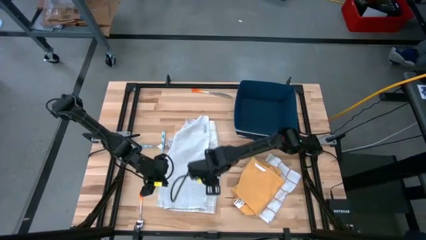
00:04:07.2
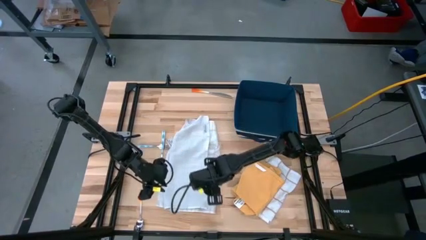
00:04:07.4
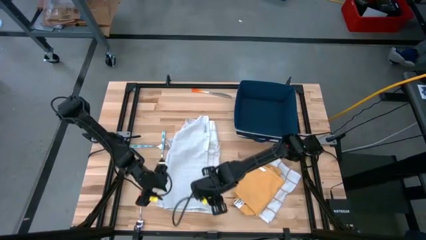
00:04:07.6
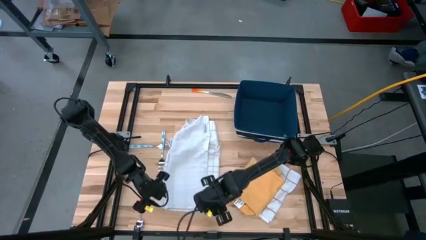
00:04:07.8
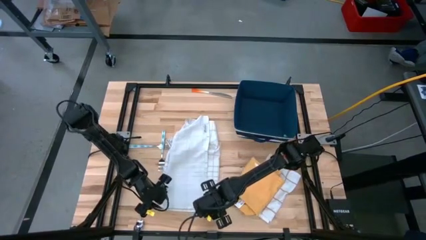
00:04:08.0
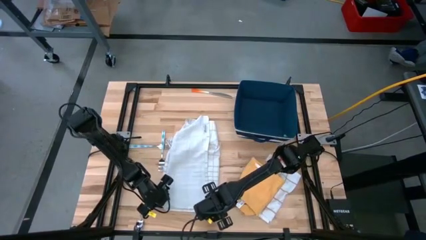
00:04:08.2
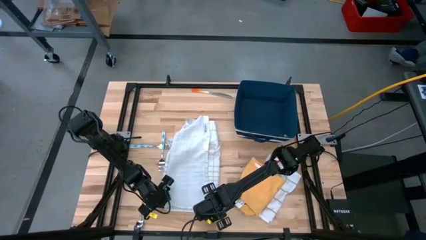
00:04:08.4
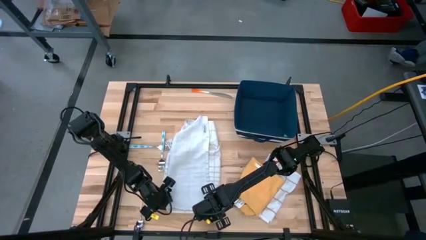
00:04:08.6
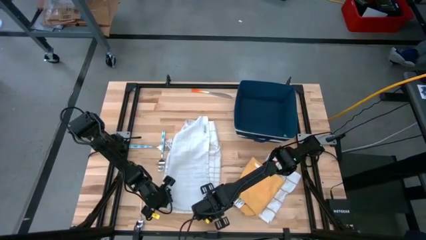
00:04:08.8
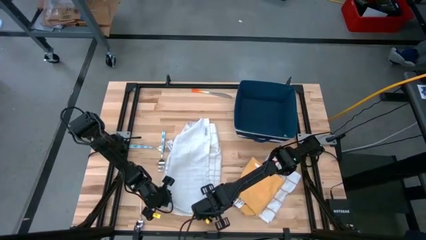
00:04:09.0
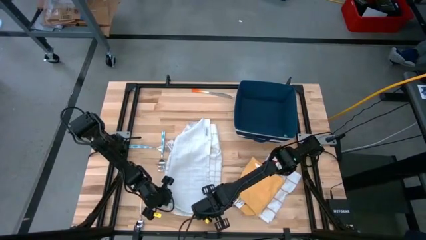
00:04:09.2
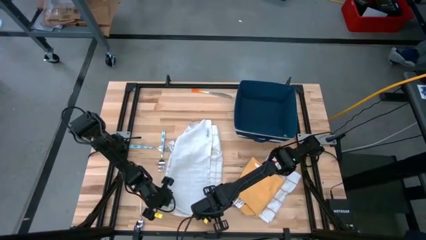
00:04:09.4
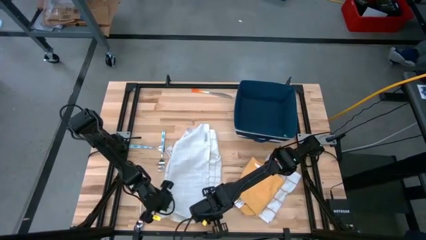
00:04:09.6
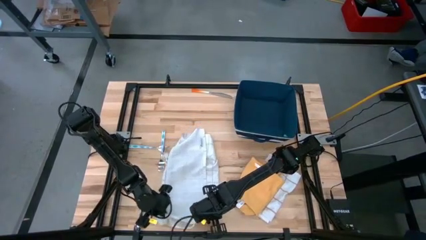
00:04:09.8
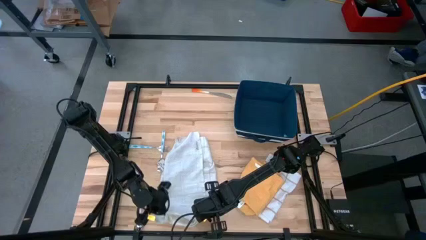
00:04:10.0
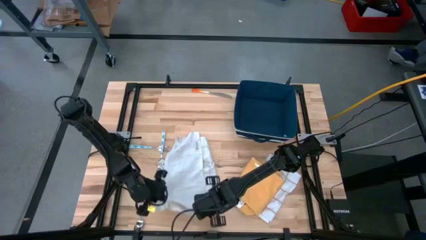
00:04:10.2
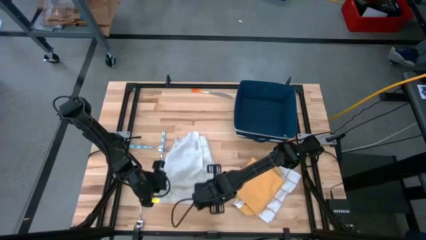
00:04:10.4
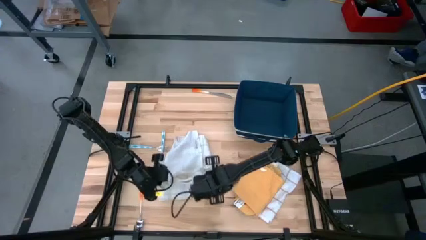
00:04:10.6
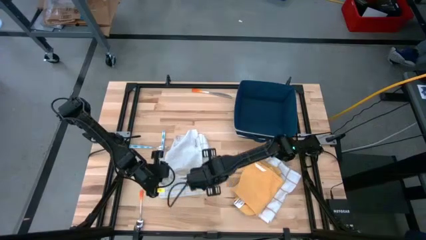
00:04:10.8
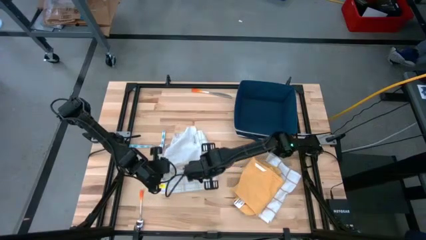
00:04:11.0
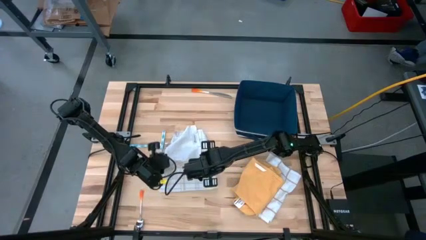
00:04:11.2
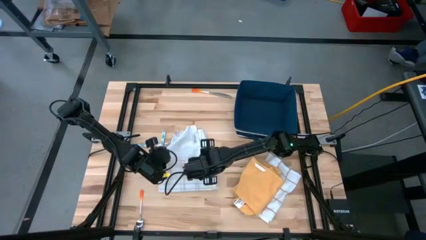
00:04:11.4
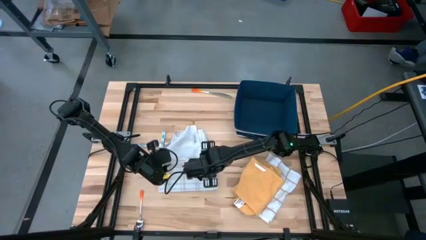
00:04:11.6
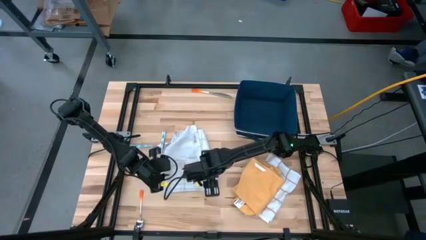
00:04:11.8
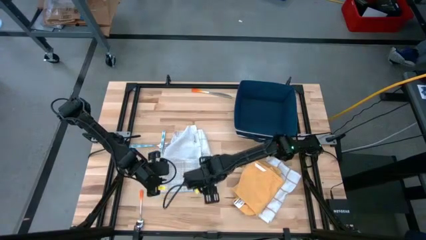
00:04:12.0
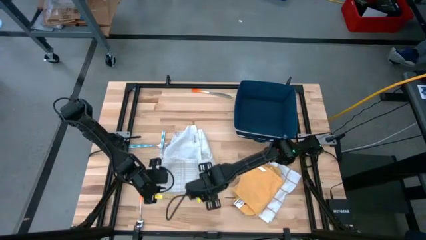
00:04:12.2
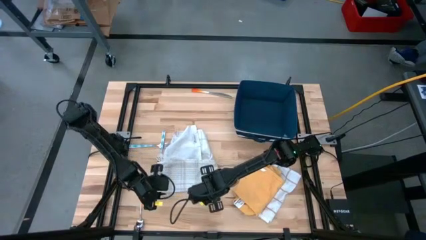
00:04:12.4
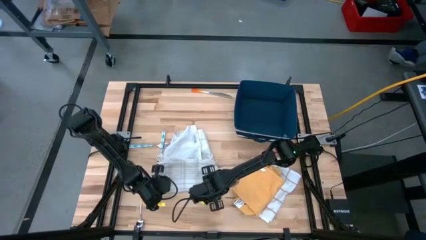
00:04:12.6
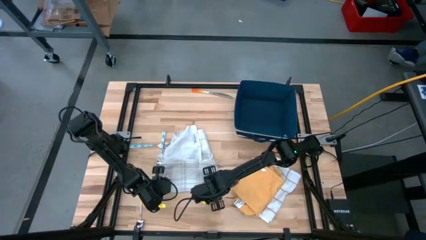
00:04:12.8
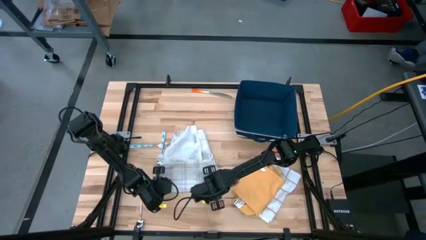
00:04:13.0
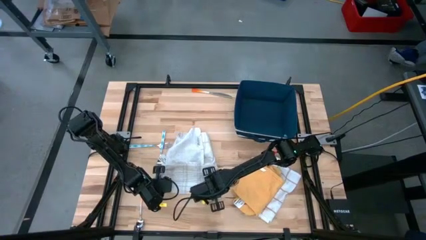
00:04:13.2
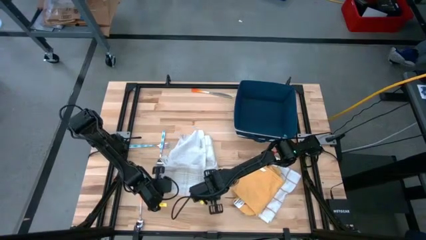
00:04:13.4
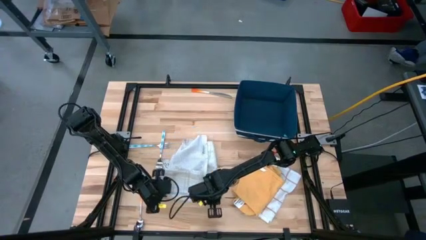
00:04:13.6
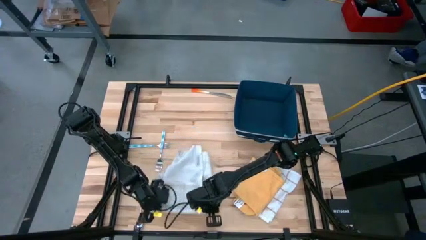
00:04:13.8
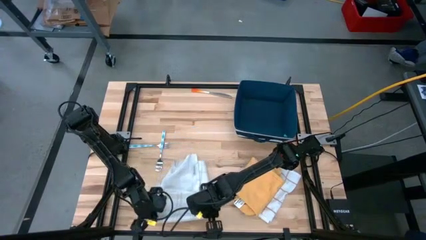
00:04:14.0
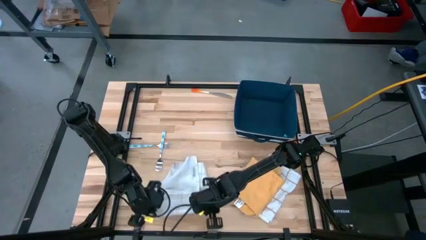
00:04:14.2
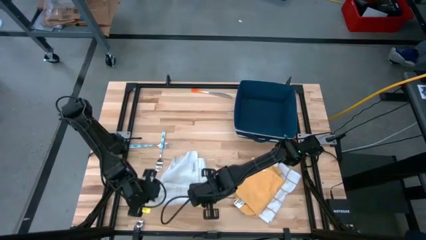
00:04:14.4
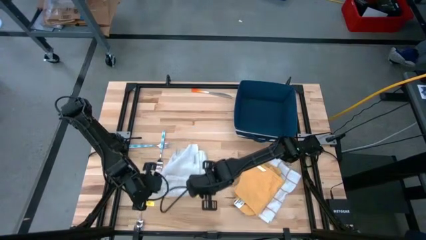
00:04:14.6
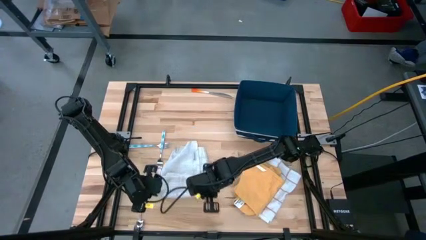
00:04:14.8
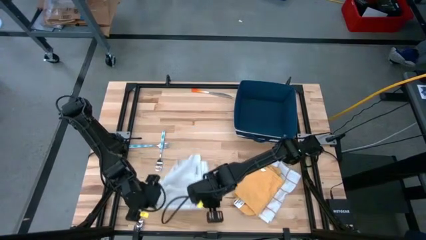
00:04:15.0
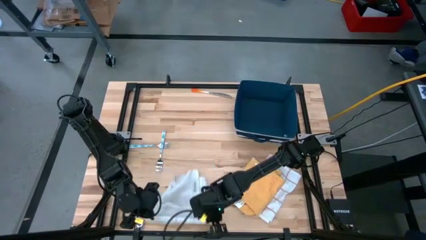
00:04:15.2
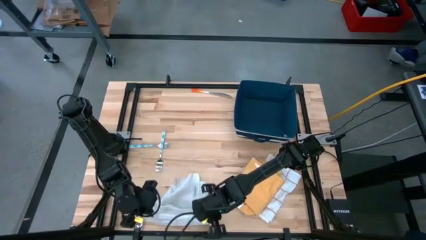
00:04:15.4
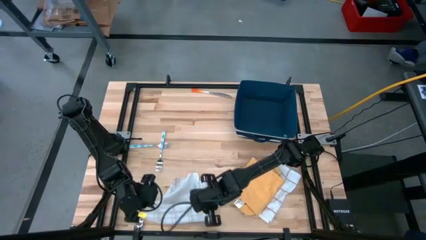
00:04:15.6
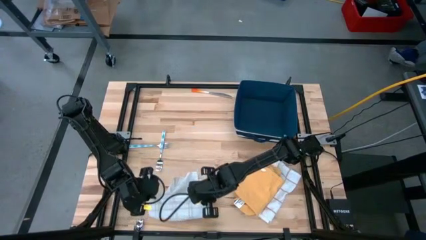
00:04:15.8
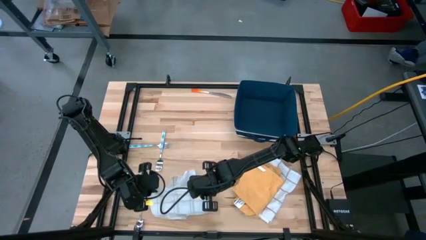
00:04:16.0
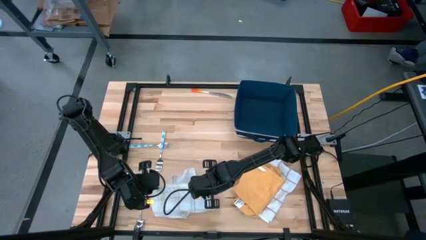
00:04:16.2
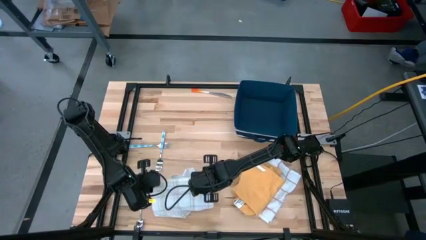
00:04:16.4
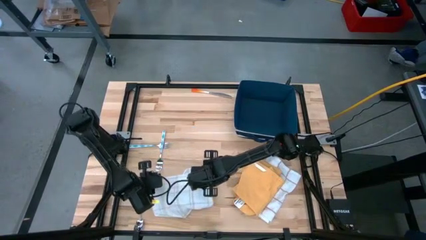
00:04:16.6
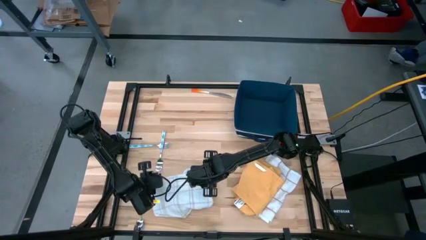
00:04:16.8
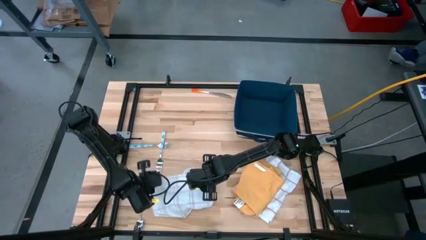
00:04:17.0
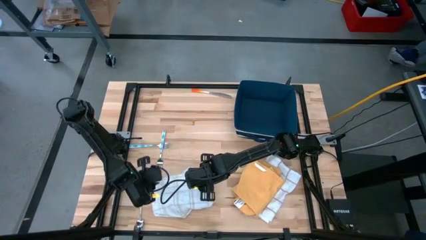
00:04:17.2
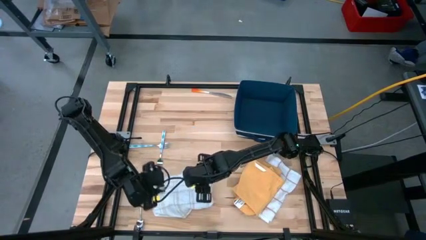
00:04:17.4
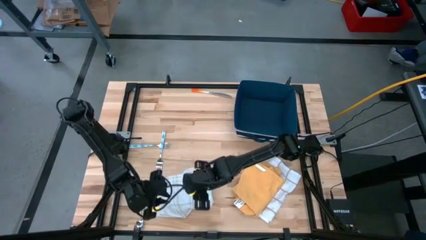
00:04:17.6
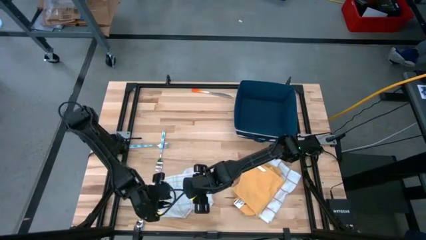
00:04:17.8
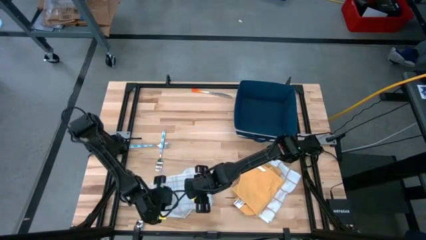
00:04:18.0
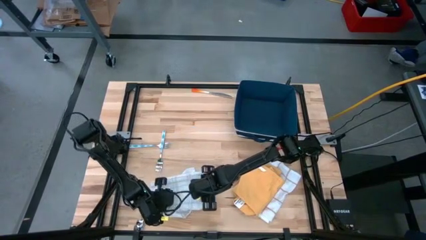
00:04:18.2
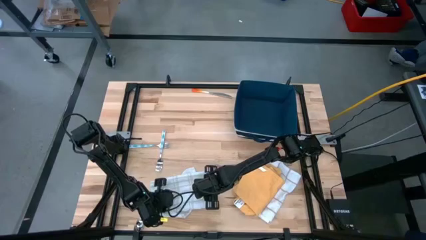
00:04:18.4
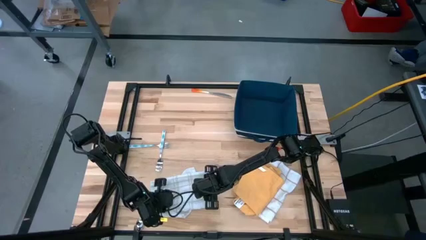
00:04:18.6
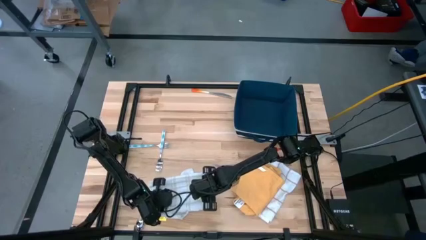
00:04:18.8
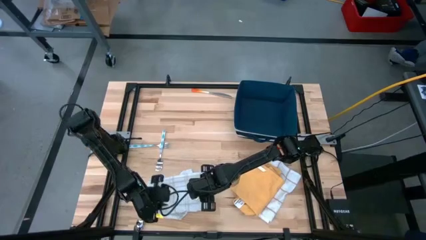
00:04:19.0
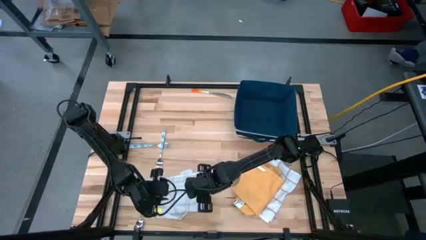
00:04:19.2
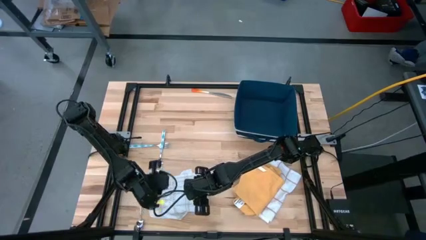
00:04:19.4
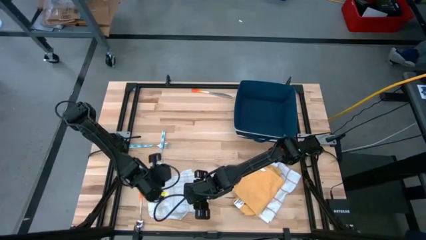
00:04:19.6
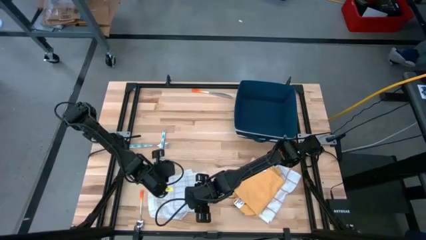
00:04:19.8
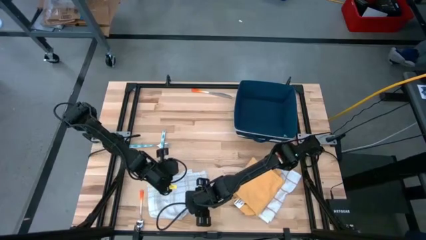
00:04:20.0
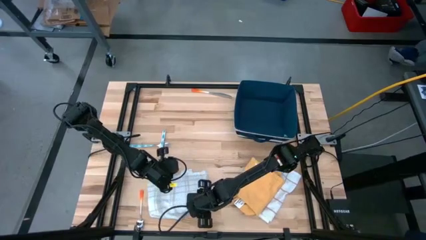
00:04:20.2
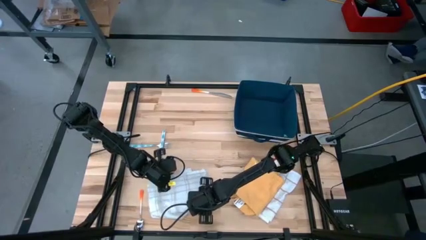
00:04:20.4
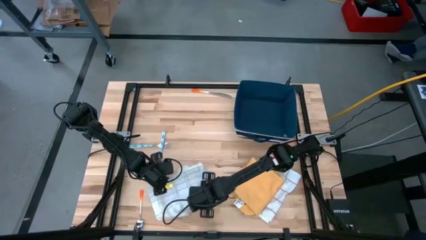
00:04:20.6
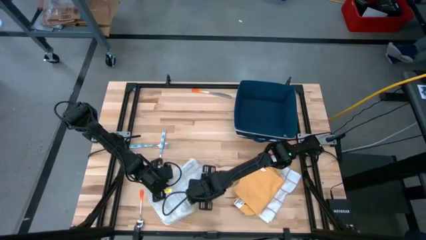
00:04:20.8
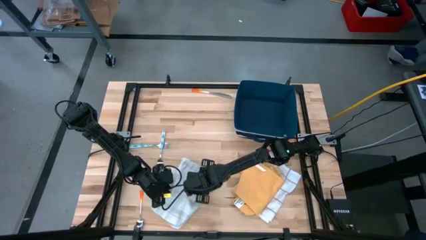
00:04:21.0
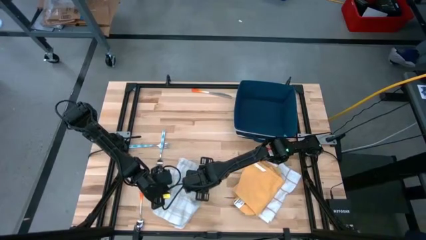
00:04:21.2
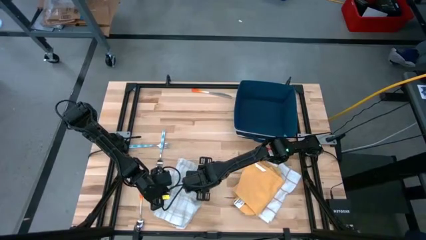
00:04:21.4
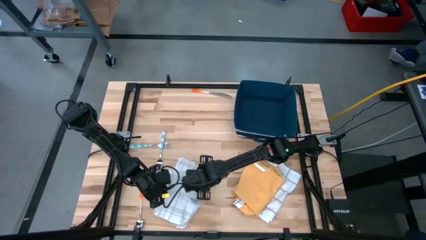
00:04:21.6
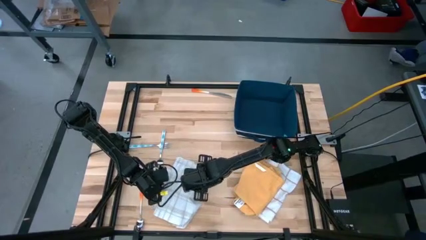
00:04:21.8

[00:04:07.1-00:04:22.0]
Task: Fold towel
Fold the white-and-gray checkered towel

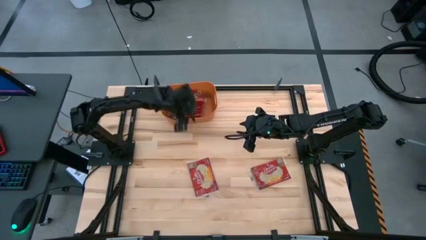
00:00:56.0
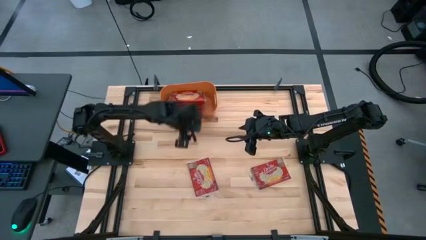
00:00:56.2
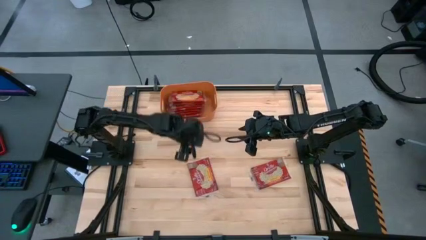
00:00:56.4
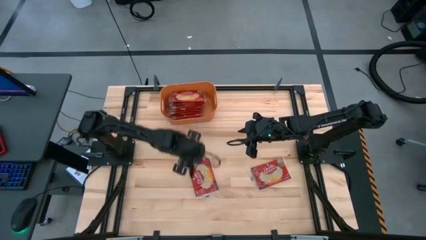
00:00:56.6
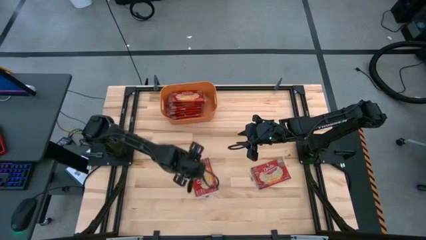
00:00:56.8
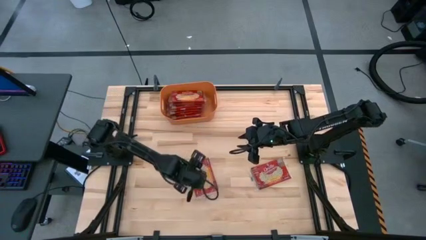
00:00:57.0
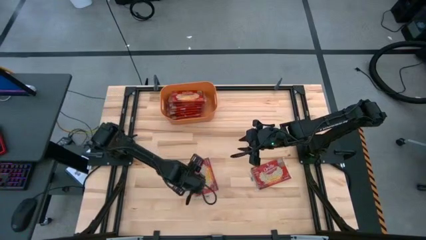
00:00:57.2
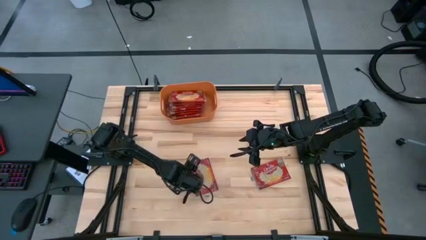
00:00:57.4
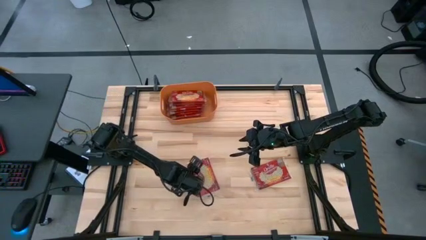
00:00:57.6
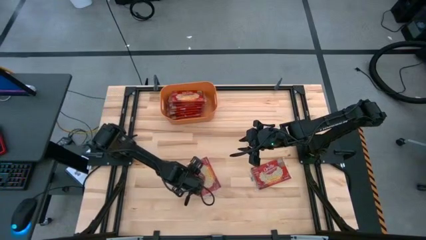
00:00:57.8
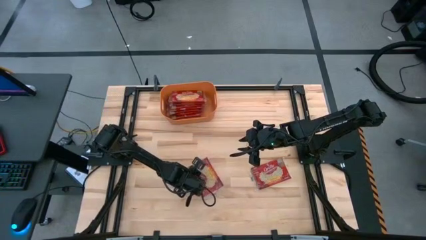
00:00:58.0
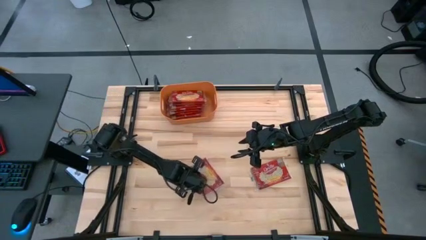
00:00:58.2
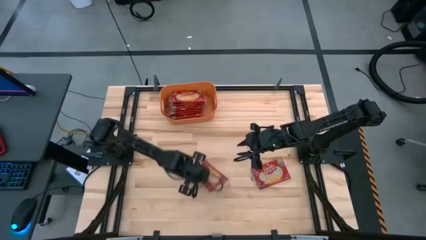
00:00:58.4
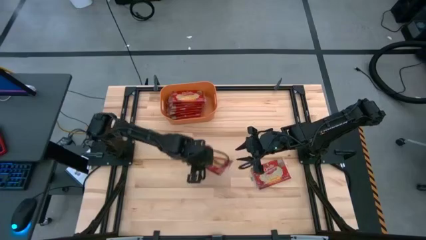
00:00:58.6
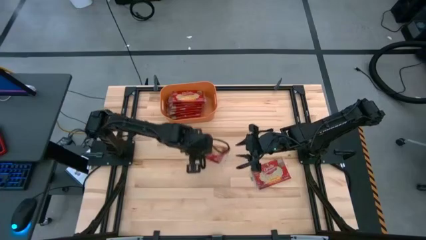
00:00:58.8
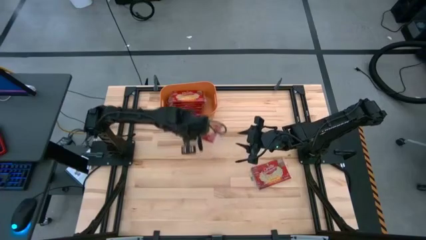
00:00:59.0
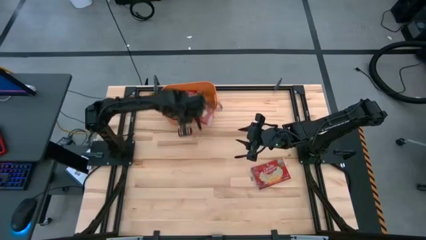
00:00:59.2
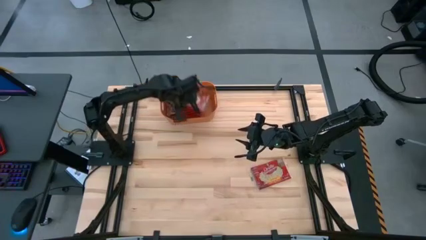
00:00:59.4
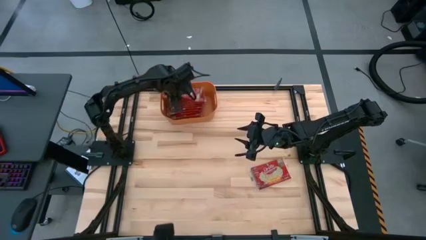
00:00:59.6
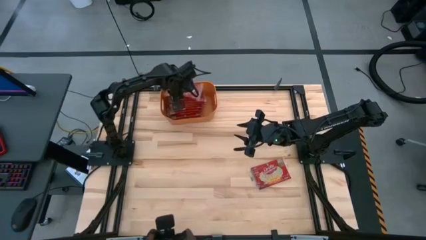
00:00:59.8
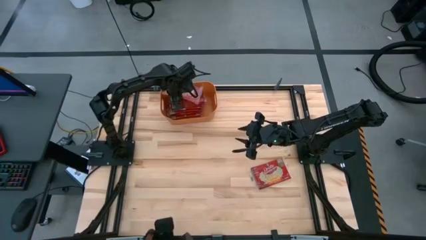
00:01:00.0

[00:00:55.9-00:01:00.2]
Task: Sort popcorn bags into baskets
Put the red popcorn bag into the orange bin
